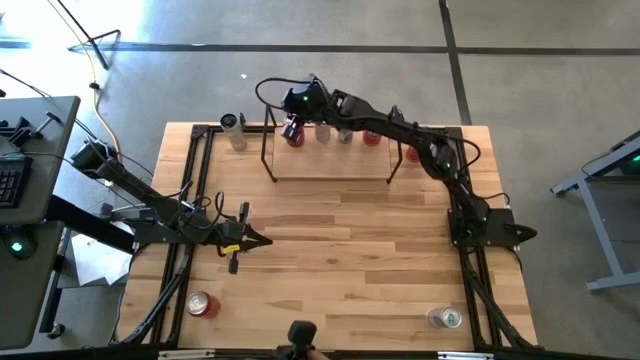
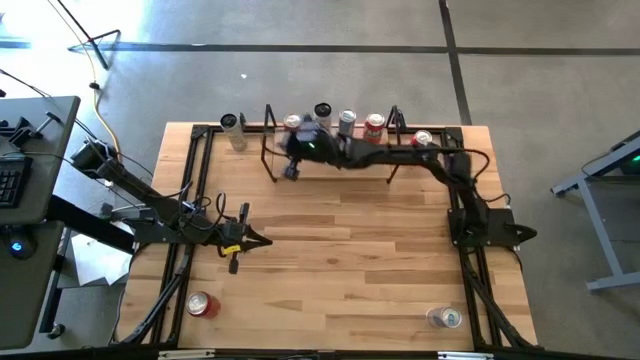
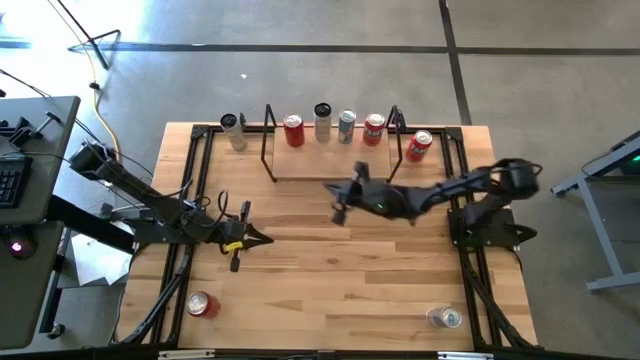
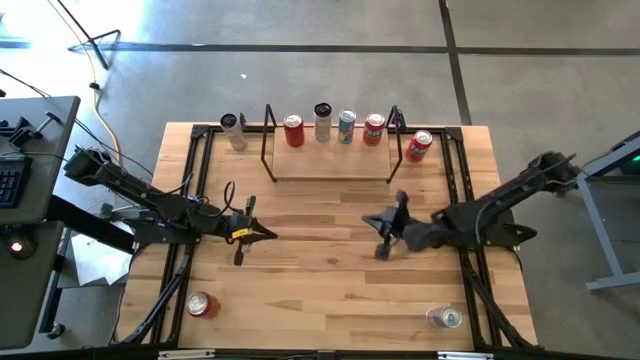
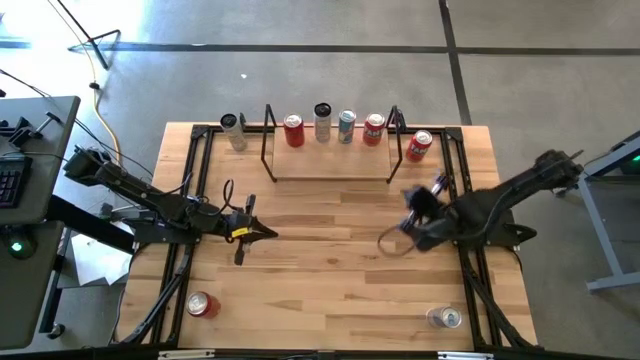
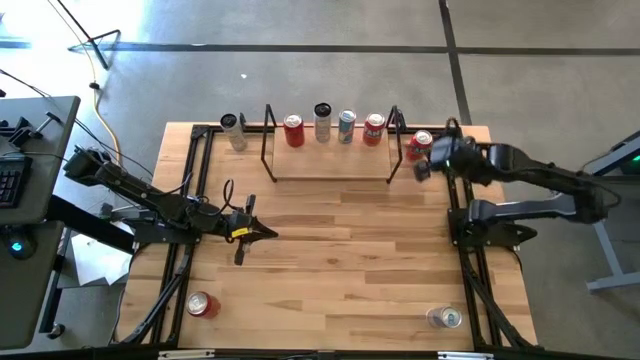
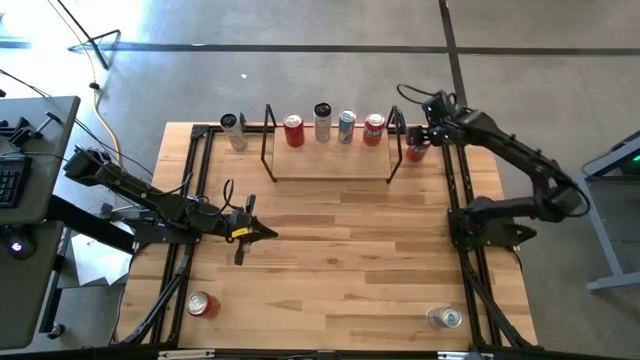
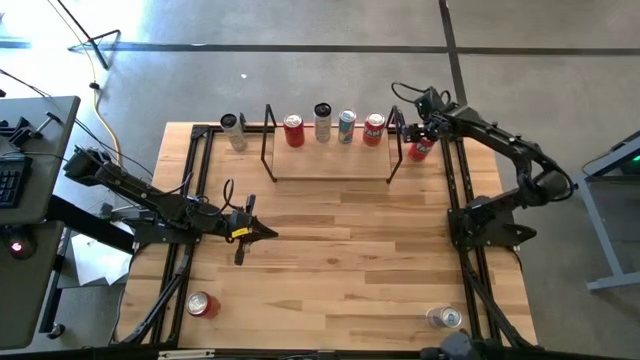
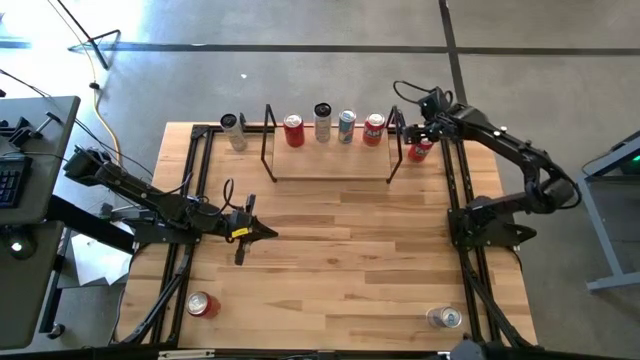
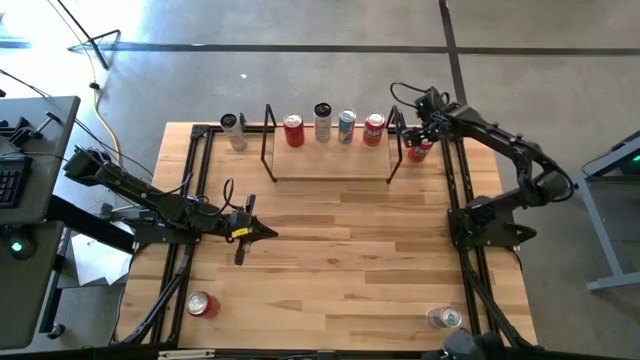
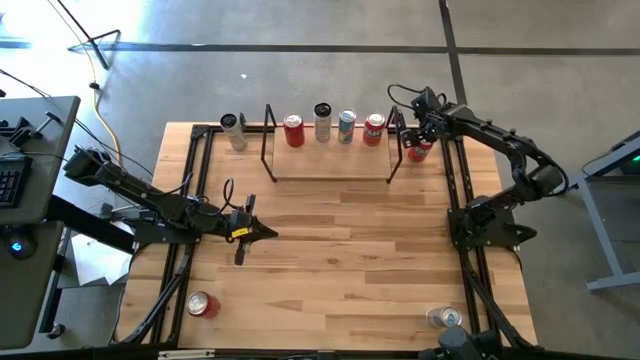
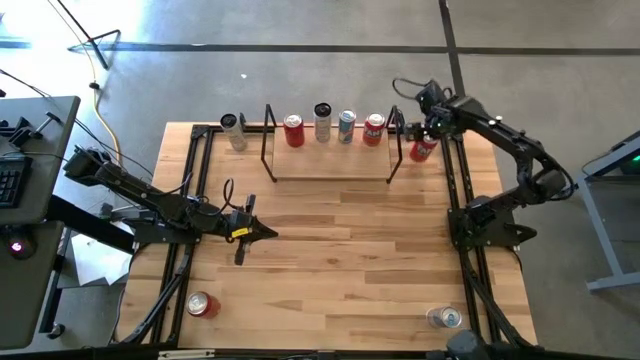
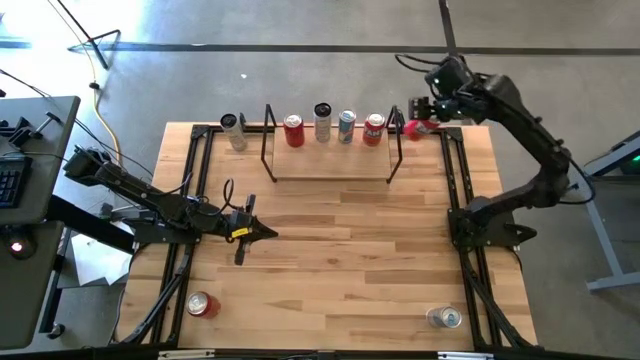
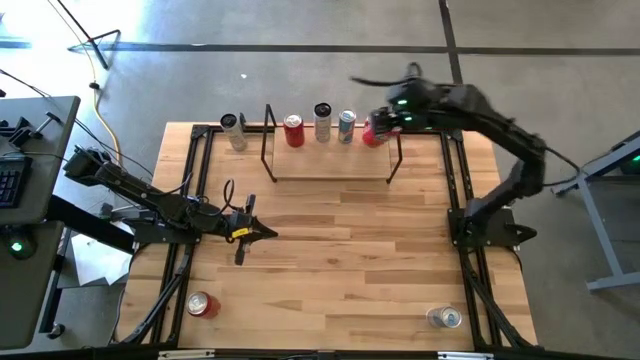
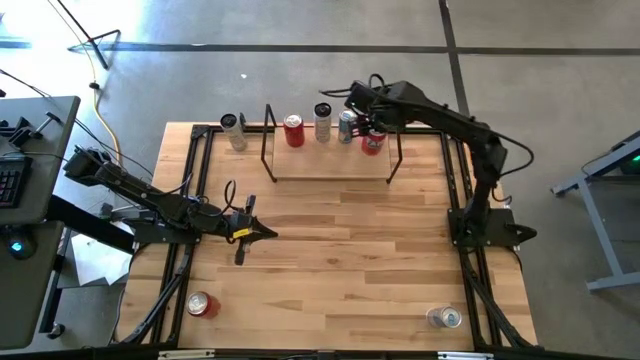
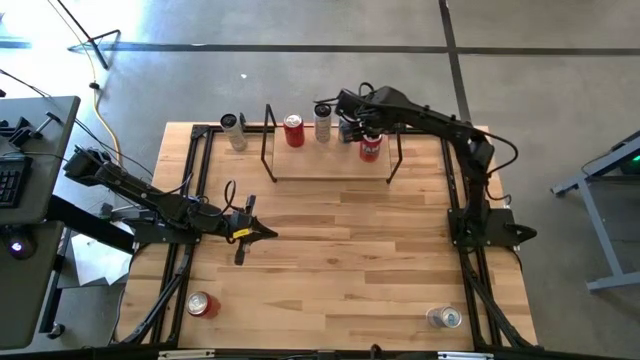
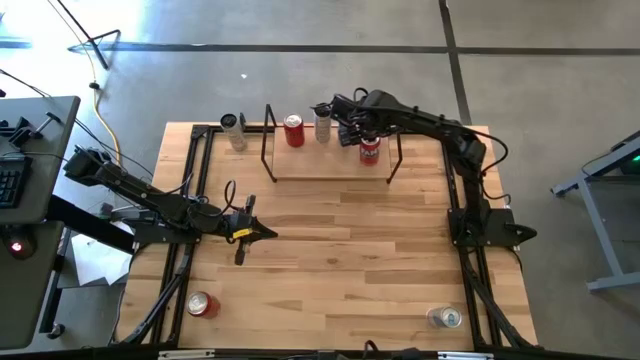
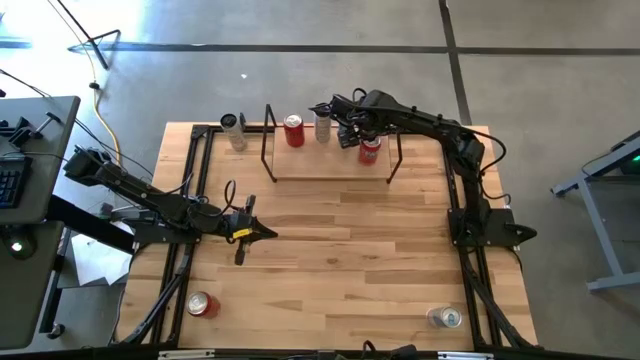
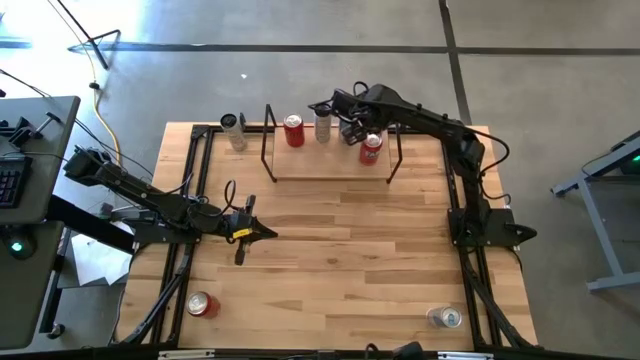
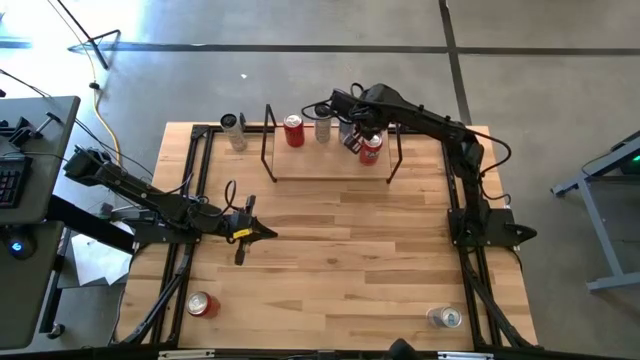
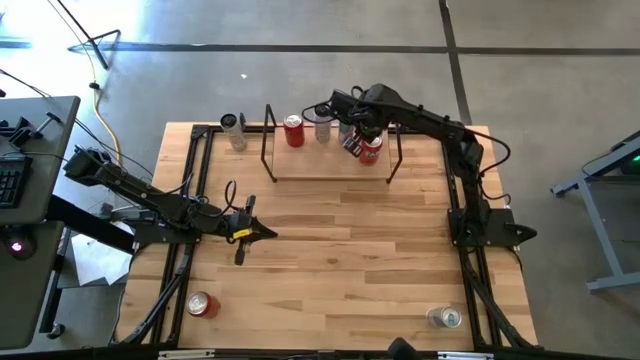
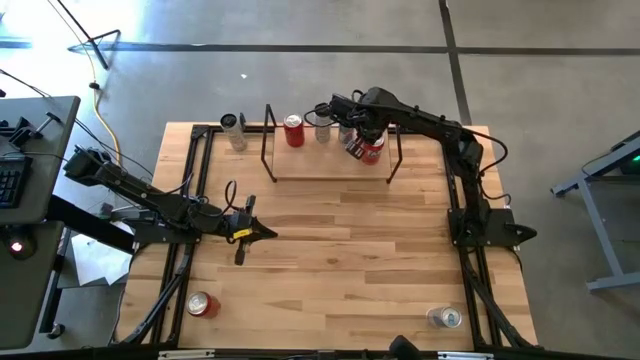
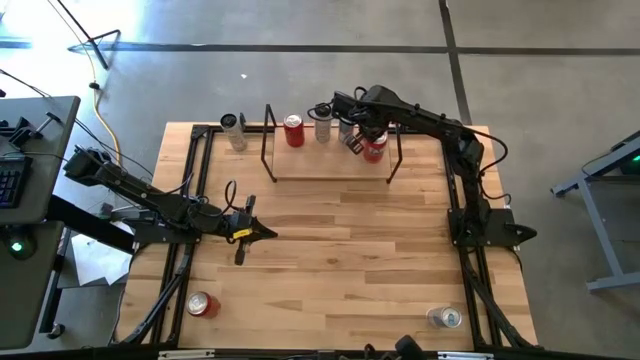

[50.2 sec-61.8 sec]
Task: Place canned beverage on shelf
Put the red soda can on the shelf aligned with the other red soda can

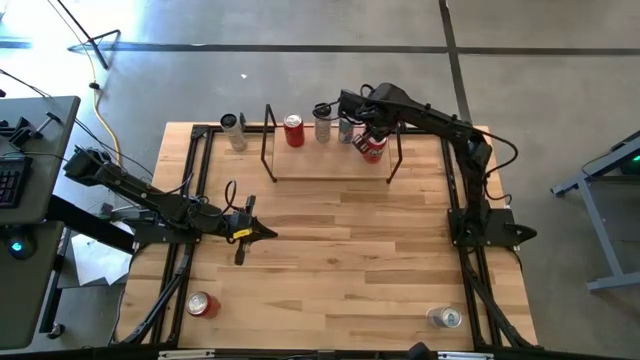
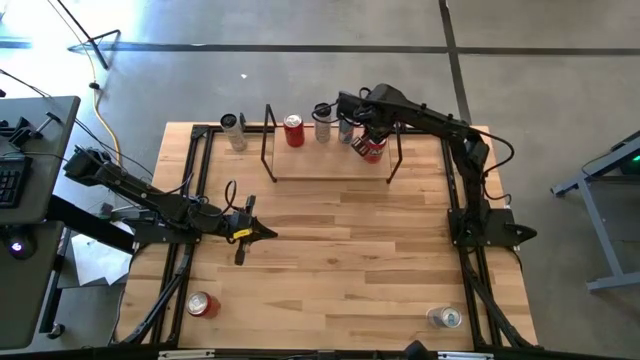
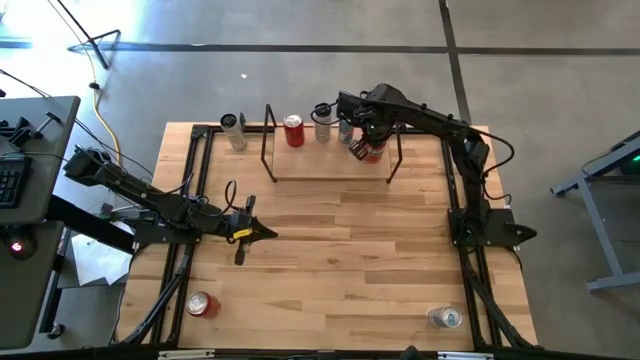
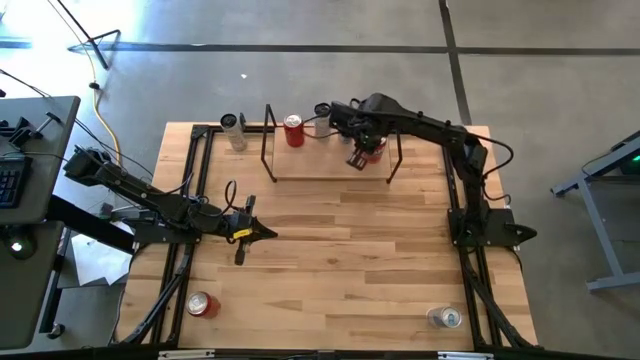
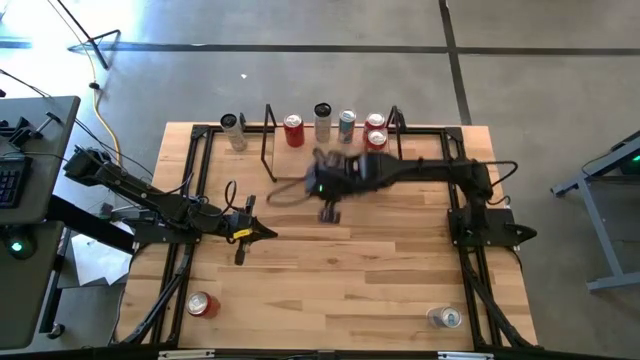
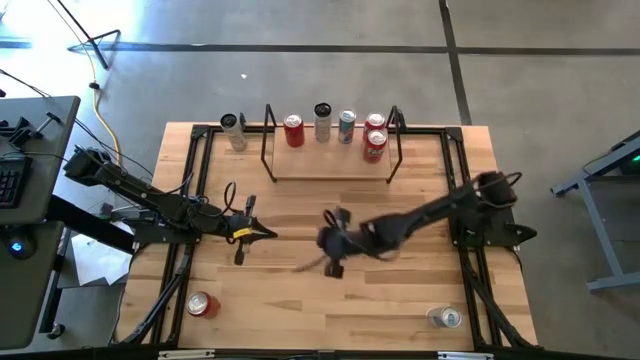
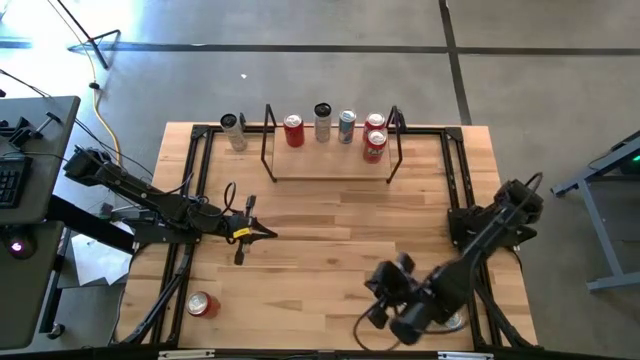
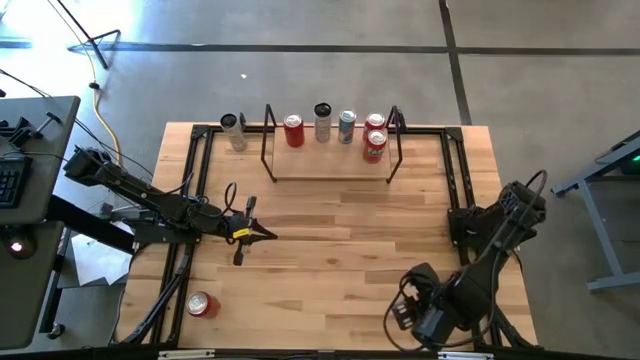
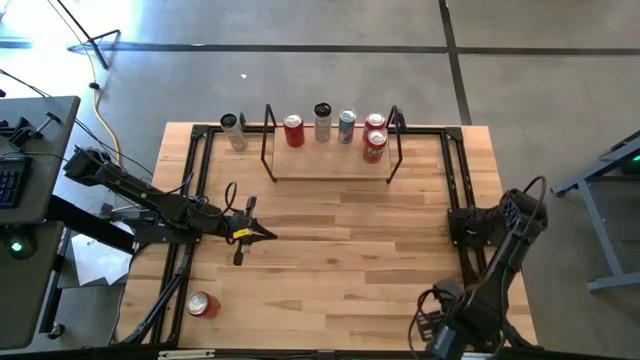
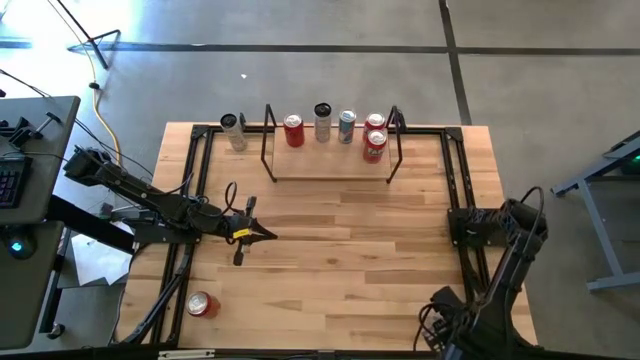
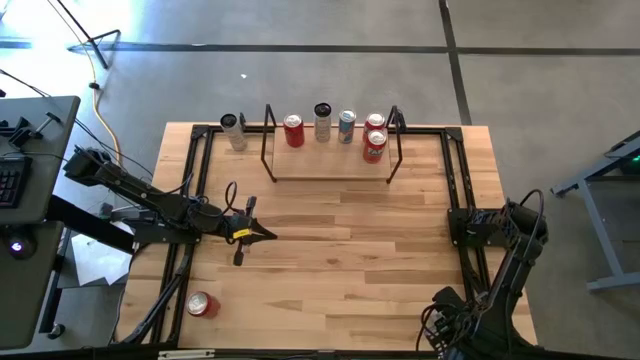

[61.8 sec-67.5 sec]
Put the blue soda can on the shelf aligned with the other blue soda can

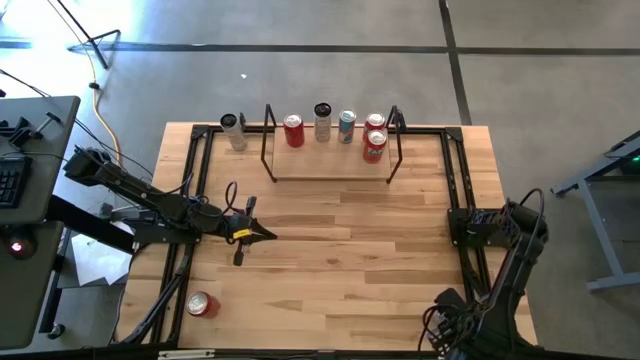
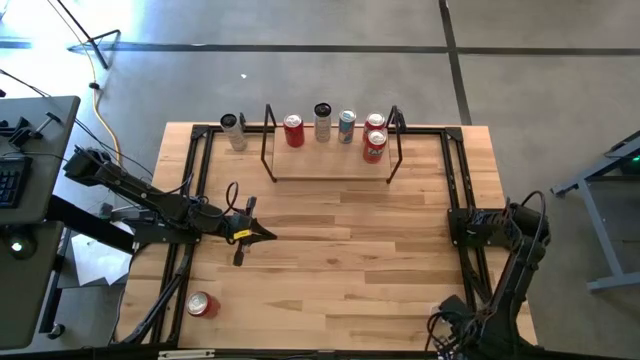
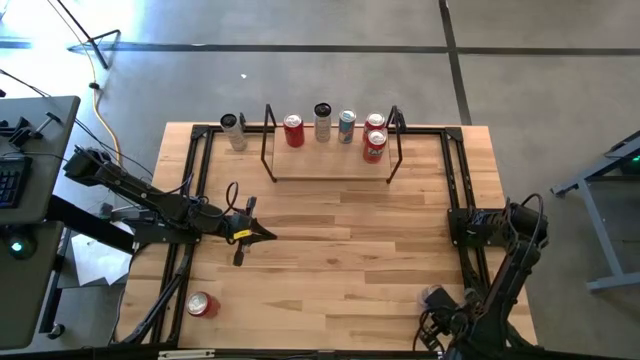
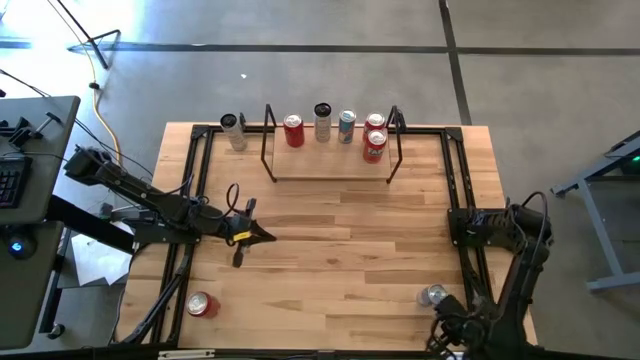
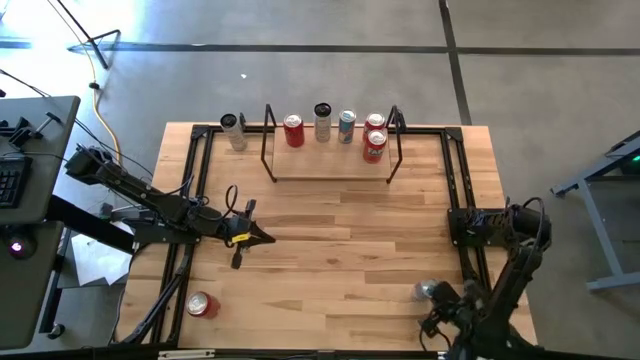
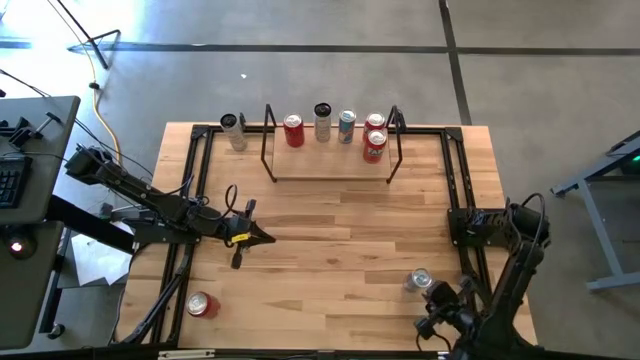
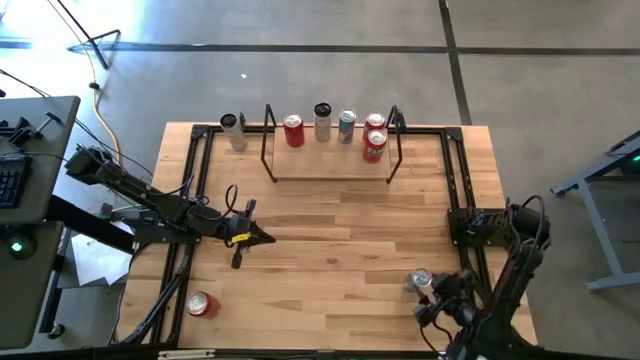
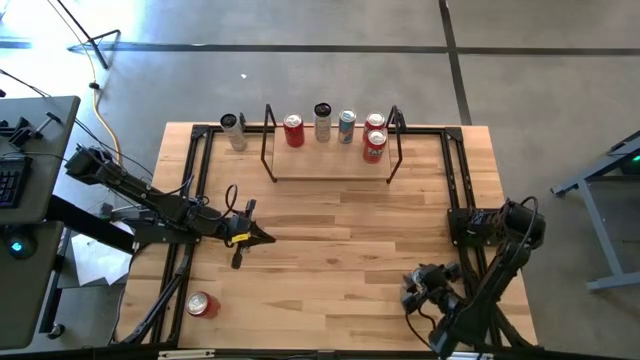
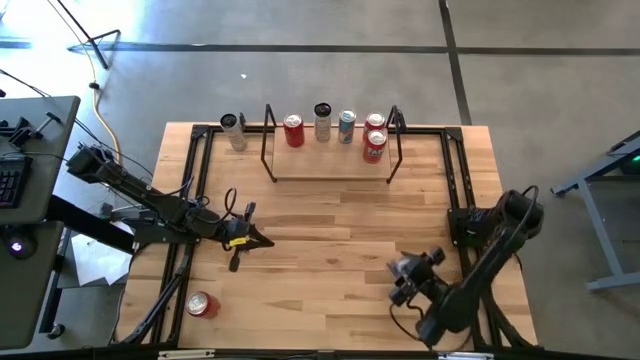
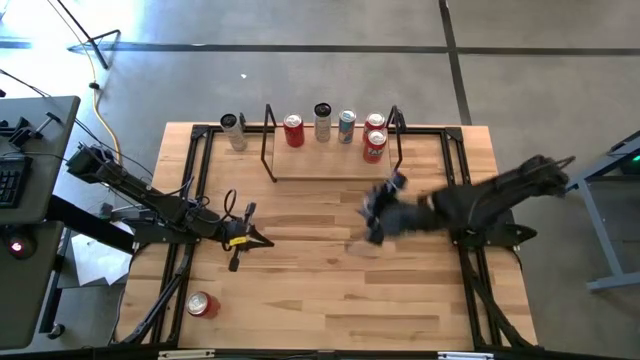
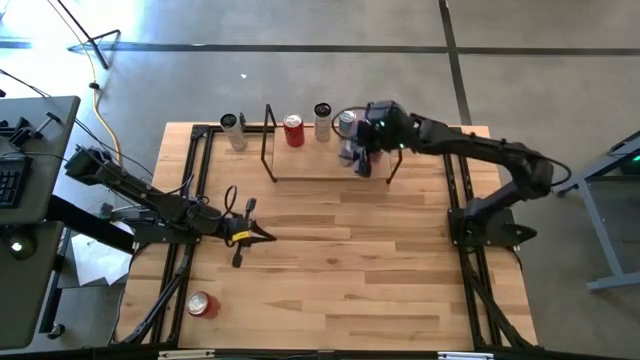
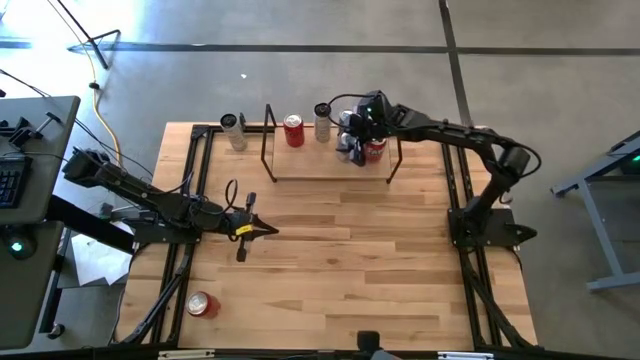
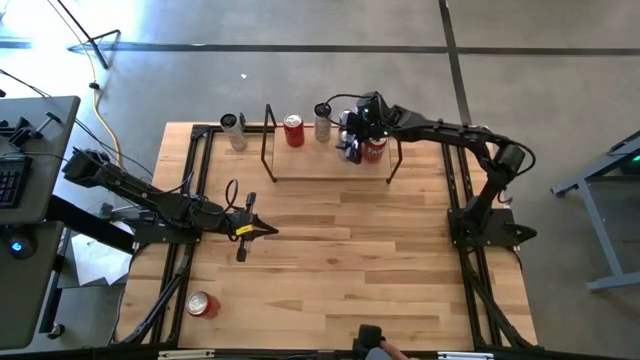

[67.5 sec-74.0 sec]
Put the blue soda can on the shelf aligned with the other blue soda can
